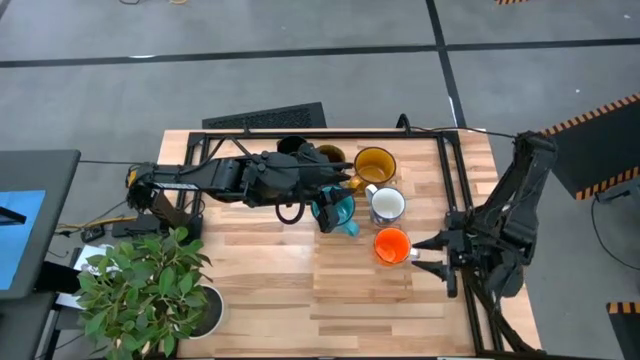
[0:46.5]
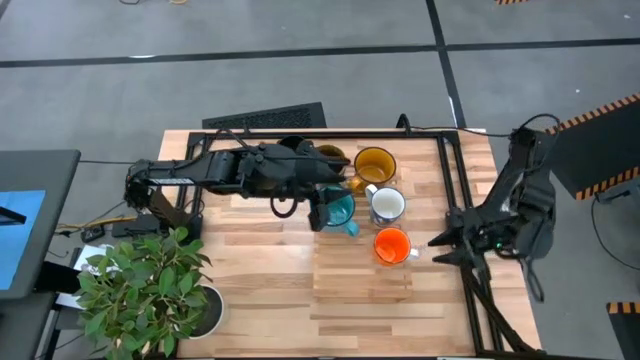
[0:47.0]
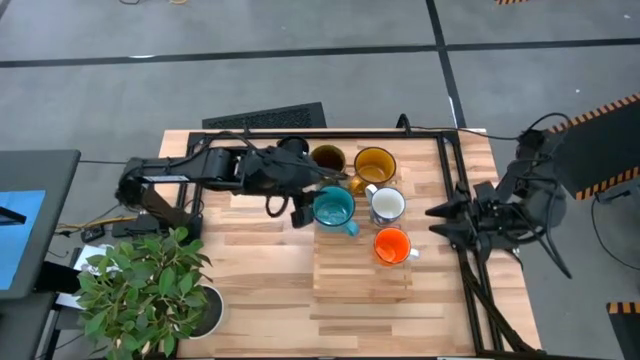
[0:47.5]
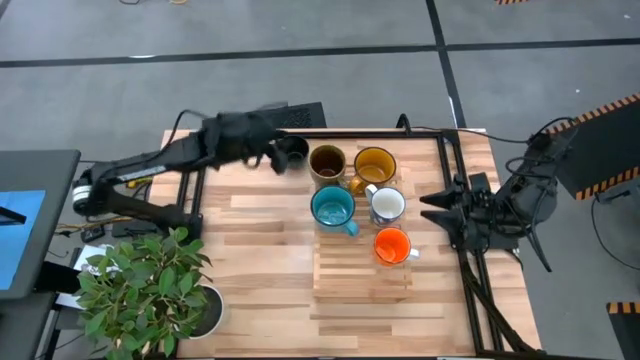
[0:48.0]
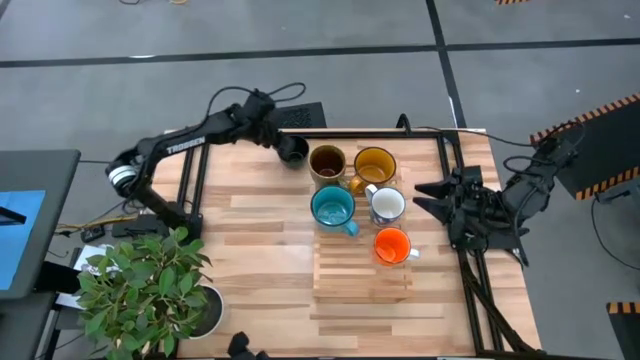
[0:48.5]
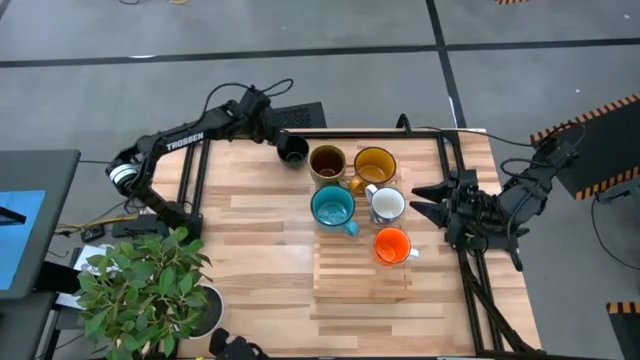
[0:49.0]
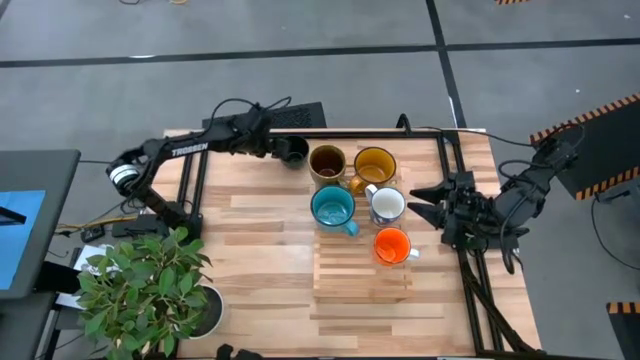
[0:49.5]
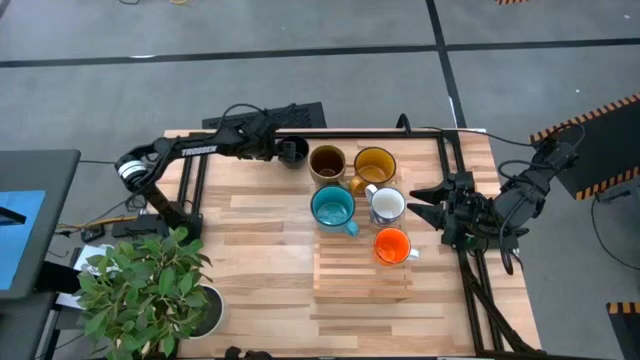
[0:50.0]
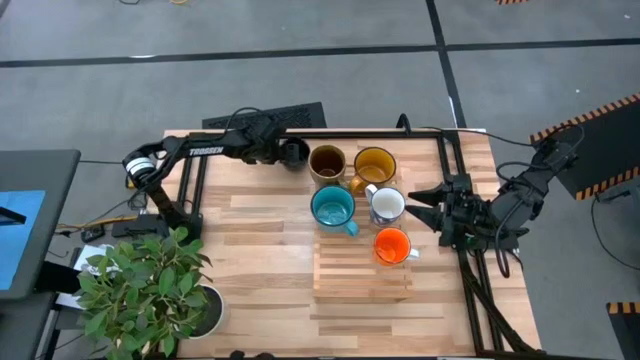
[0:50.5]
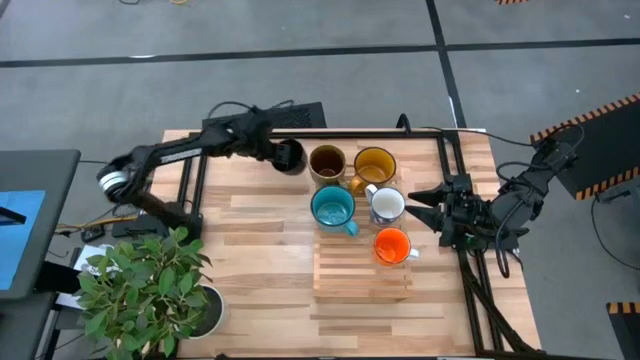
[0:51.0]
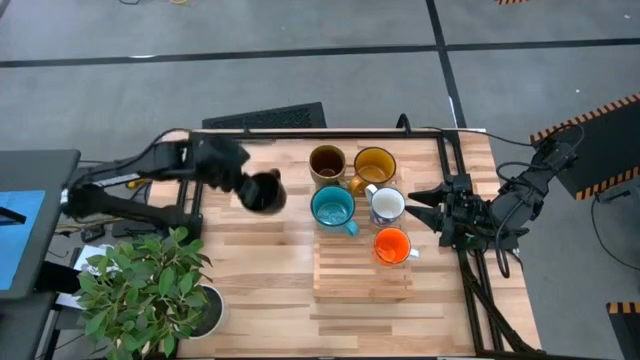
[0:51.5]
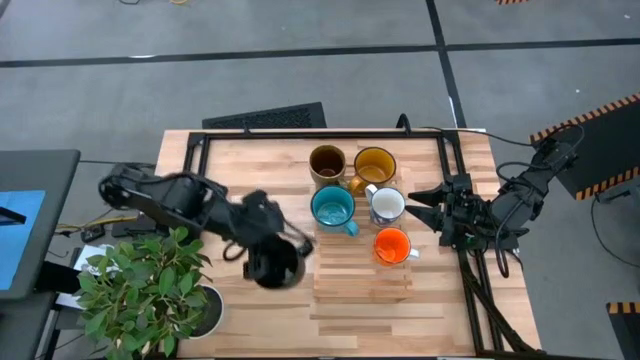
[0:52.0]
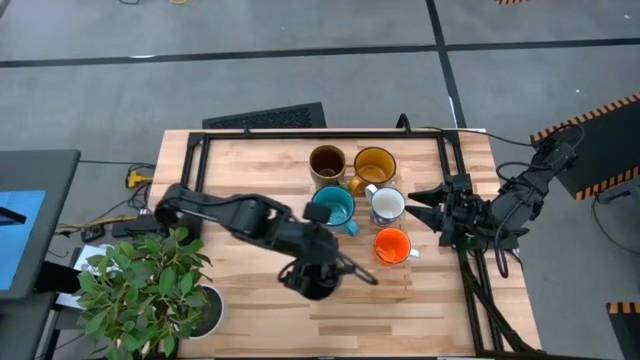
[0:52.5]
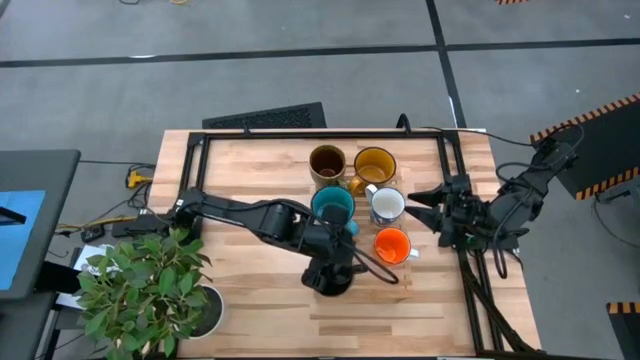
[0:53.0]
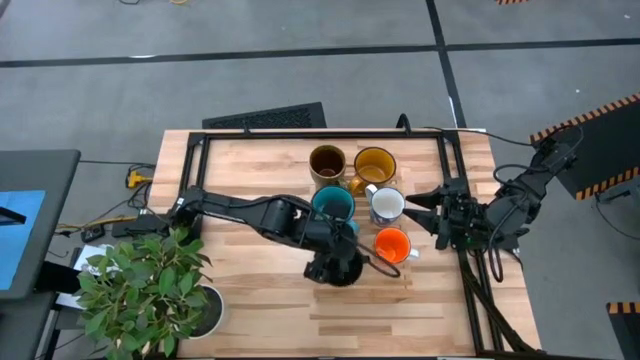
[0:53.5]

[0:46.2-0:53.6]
Task: Place coffee mugs
Put the black mug on the shelf

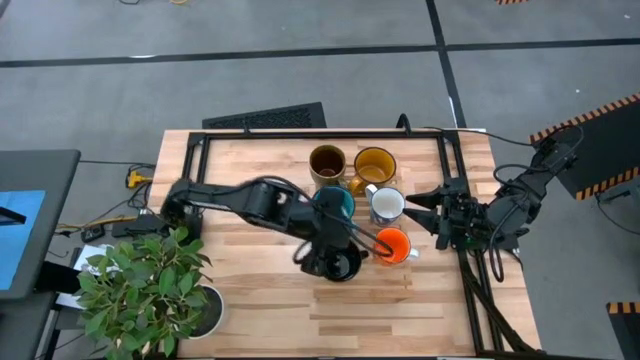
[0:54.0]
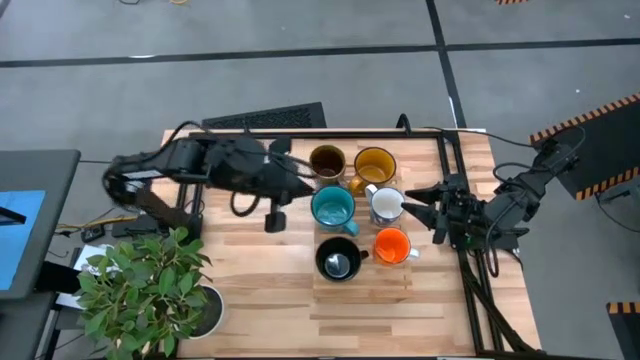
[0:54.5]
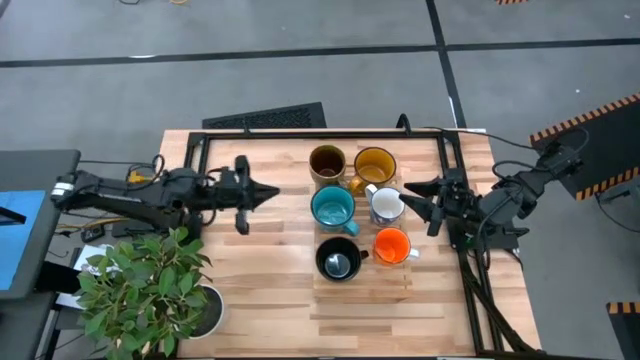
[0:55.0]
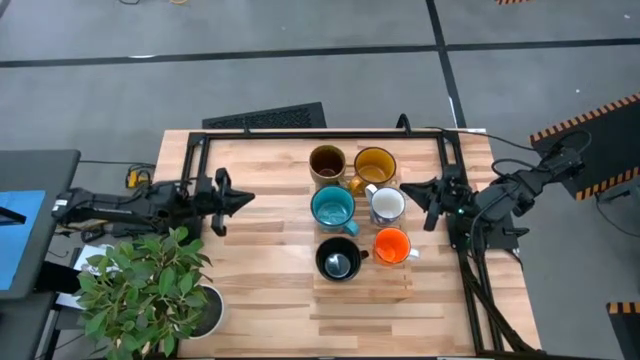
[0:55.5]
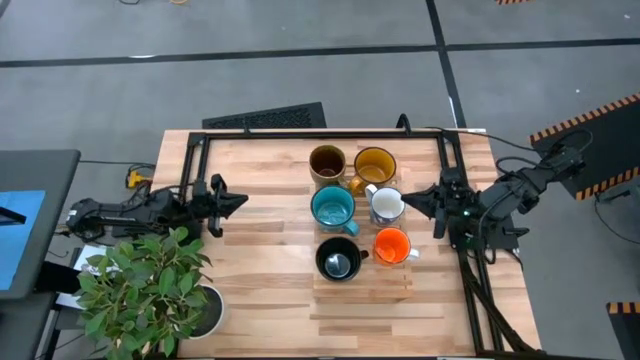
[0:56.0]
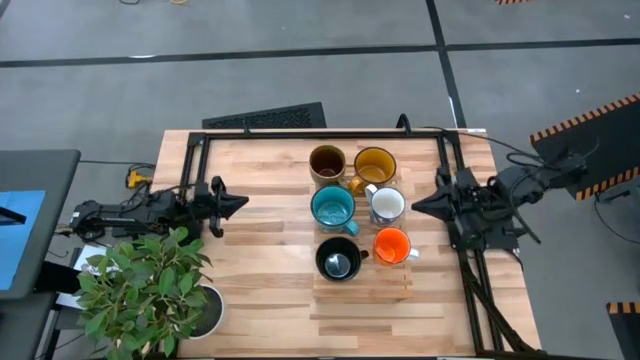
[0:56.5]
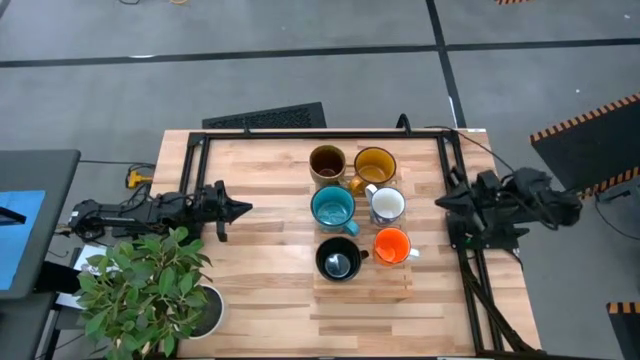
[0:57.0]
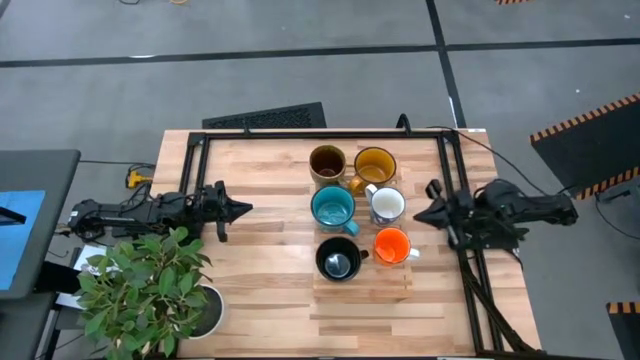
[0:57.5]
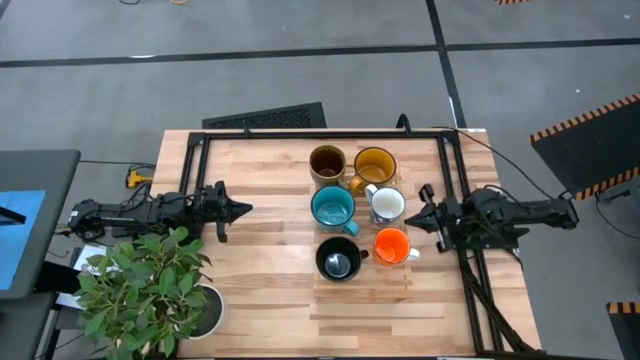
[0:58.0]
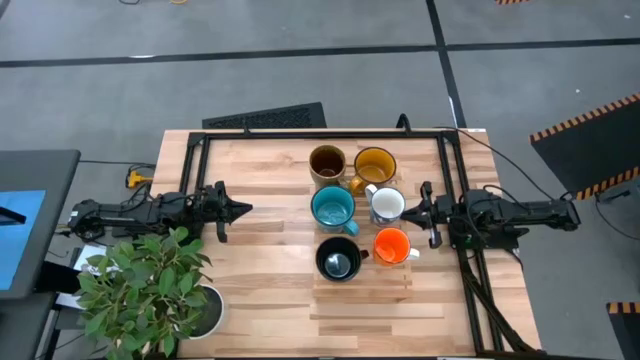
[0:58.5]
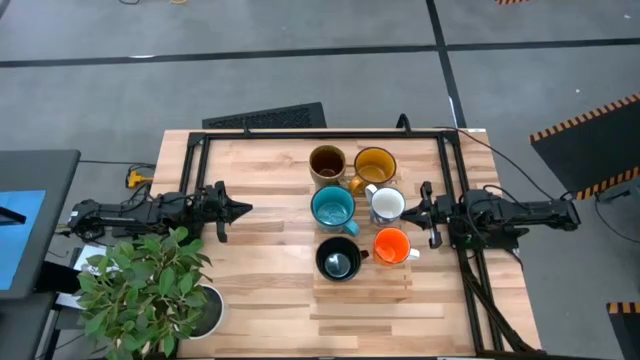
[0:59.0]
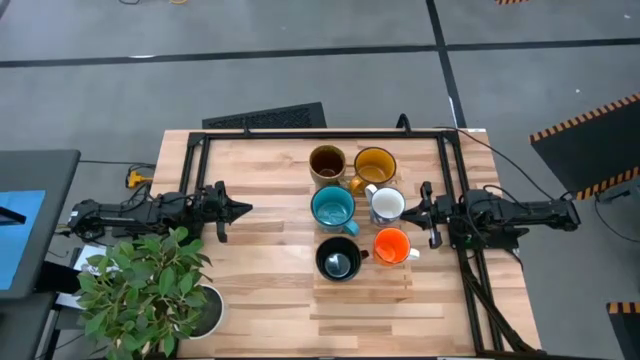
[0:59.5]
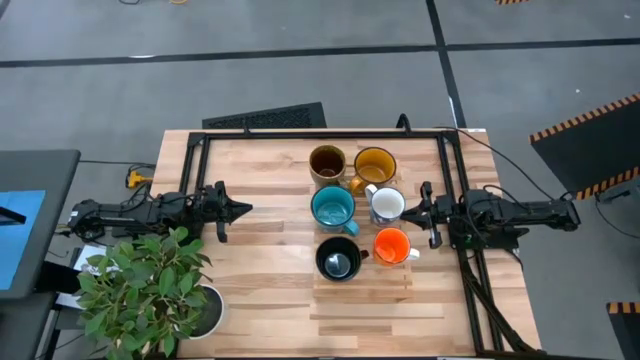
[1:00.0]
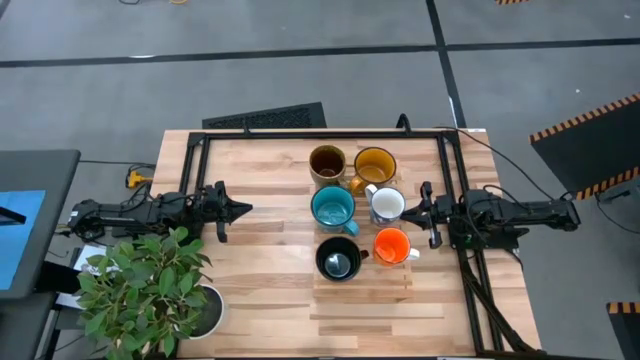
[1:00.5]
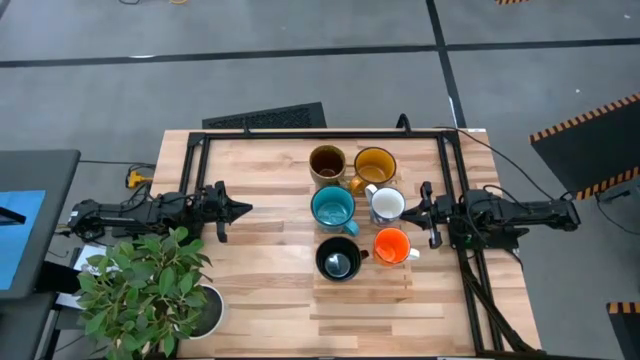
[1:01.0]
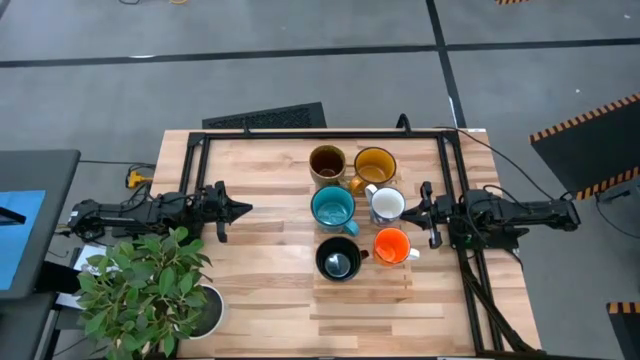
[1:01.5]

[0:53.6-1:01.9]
Return to Home Position

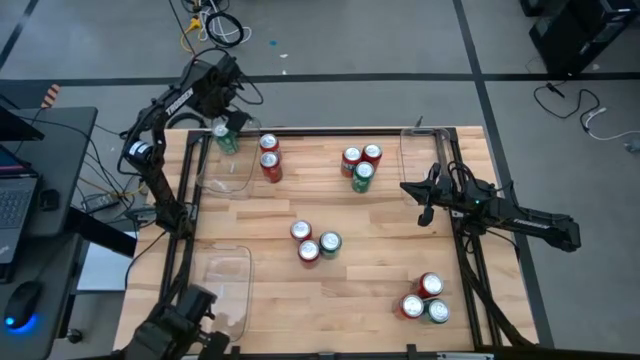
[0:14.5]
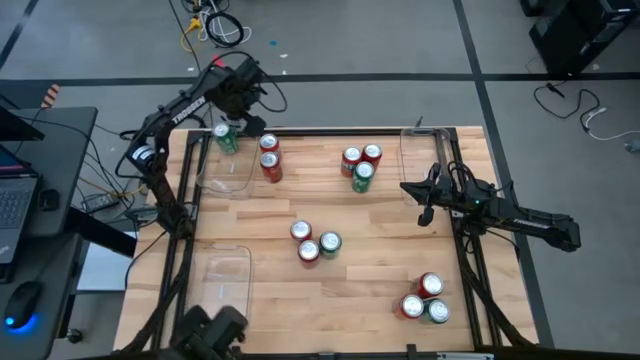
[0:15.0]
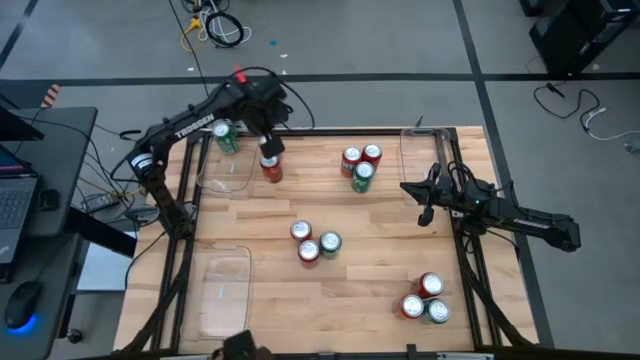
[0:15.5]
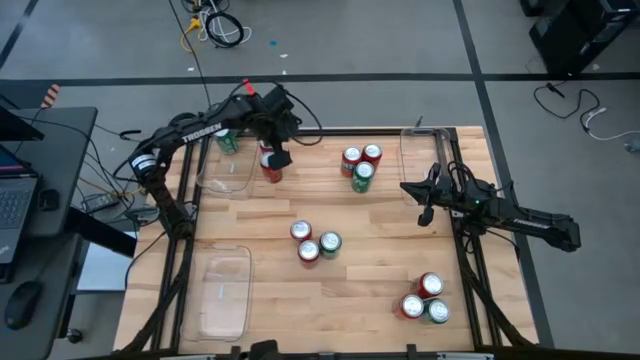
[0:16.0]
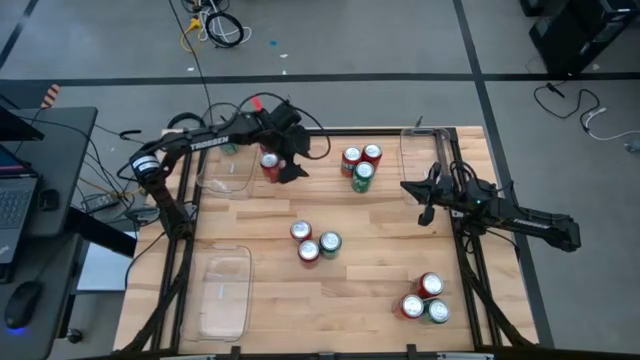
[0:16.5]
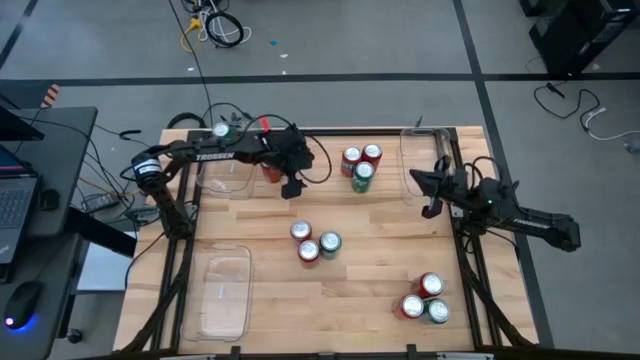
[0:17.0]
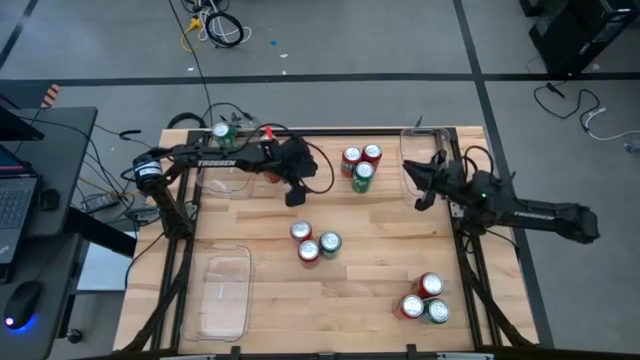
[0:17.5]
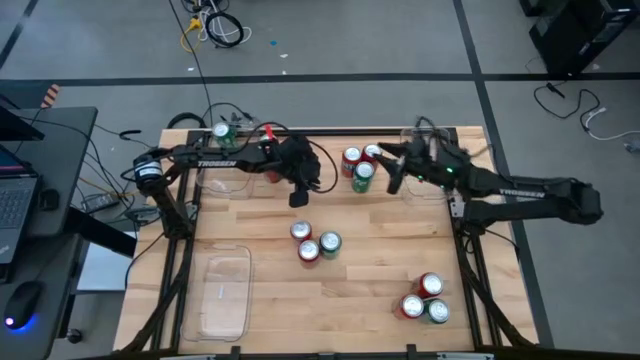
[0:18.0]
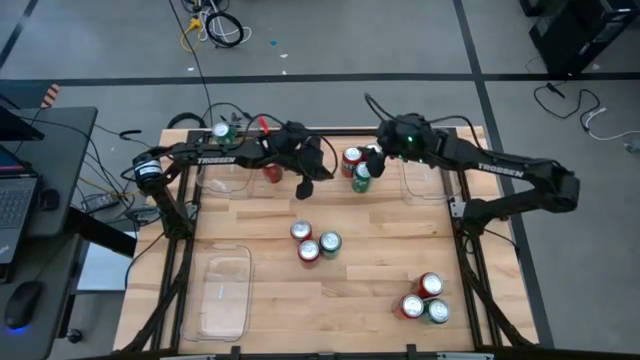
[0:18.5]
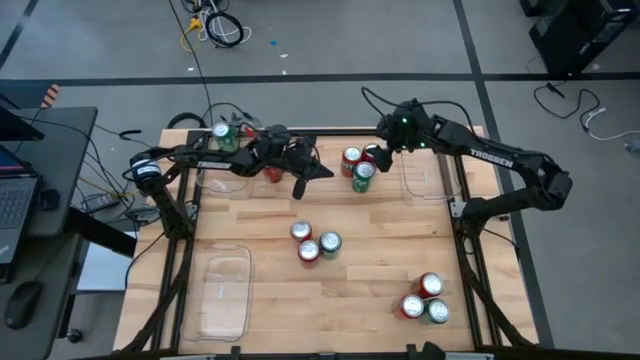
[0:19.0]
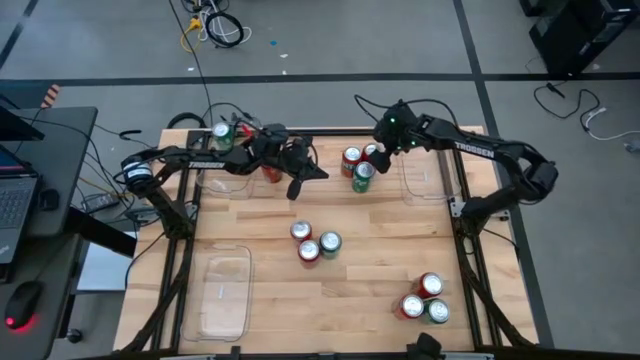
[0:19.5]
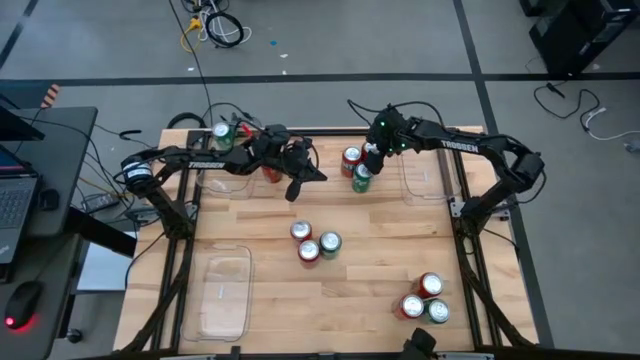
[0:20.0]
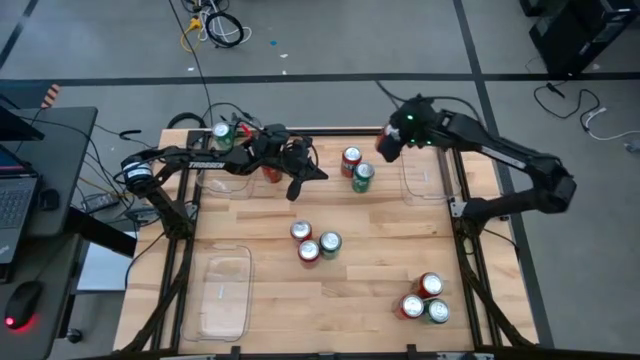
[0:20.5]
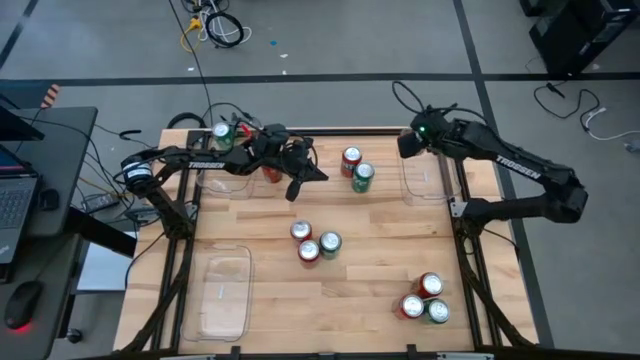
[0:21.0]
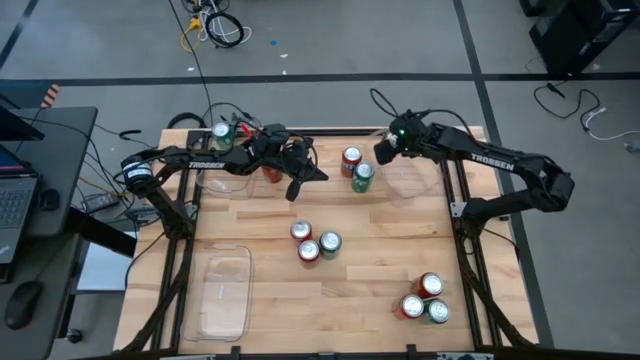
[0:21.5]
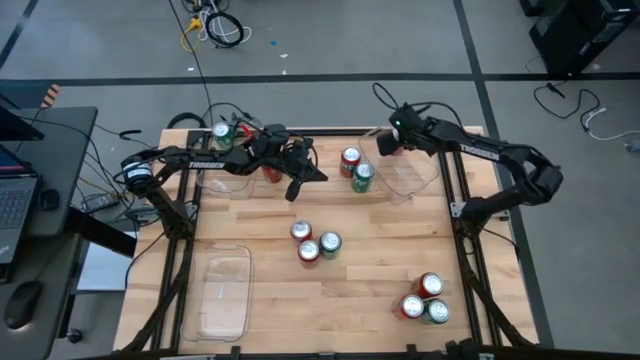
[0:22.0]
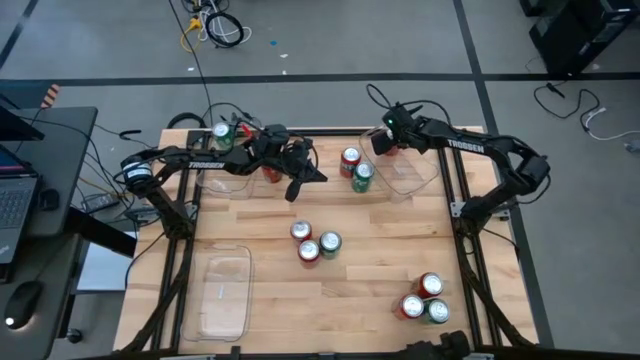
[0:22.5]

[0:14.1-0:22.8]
Task: Sort soda cans
Put the top right red and black soda can into the top right transparent bin
